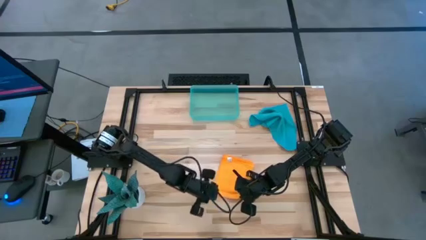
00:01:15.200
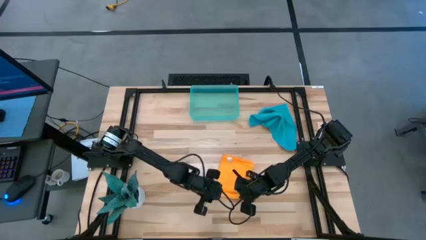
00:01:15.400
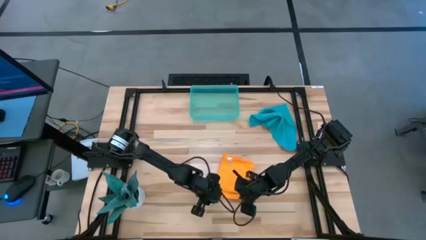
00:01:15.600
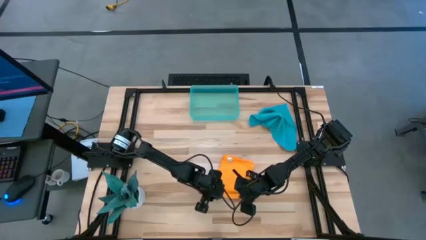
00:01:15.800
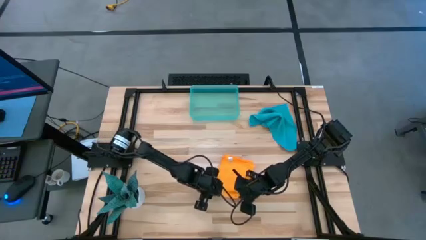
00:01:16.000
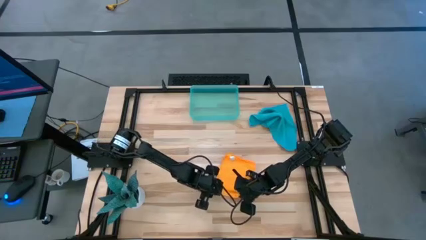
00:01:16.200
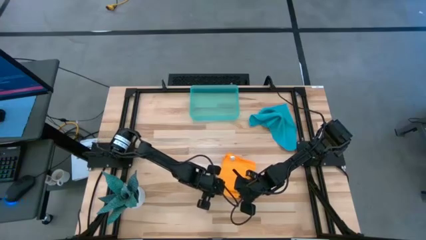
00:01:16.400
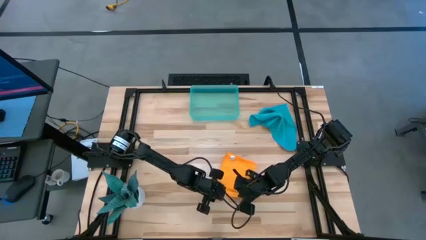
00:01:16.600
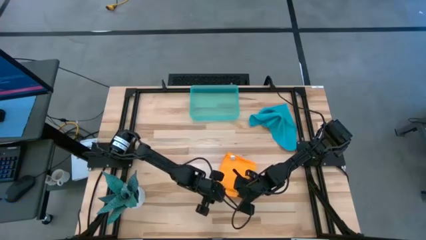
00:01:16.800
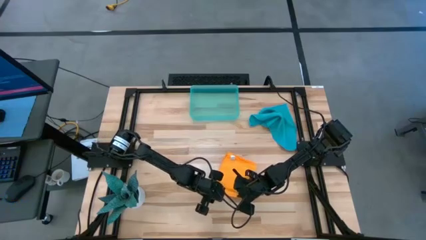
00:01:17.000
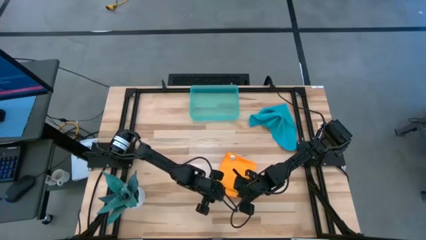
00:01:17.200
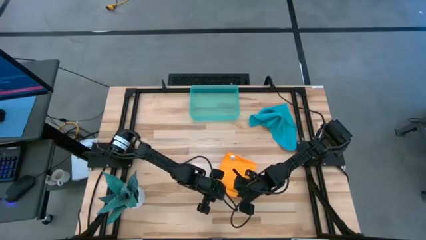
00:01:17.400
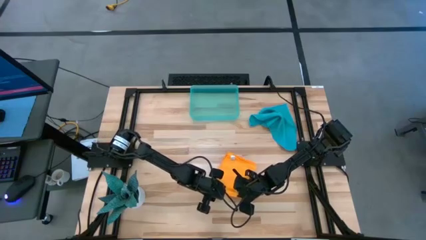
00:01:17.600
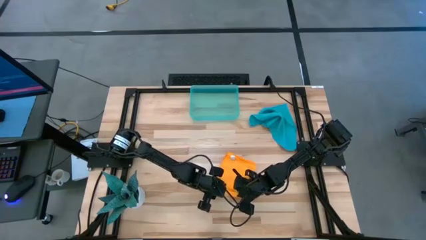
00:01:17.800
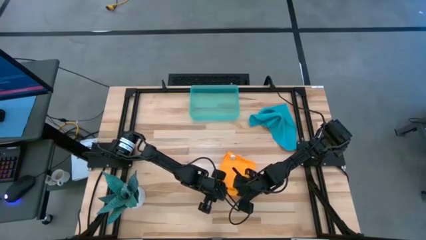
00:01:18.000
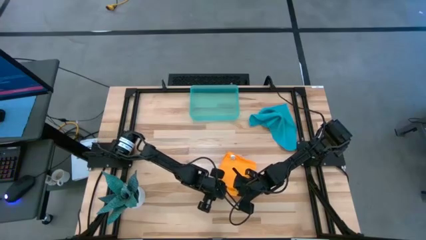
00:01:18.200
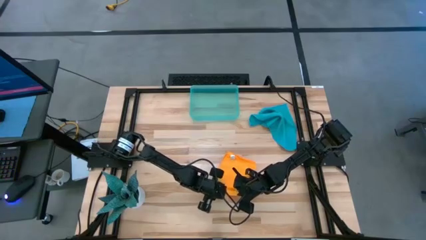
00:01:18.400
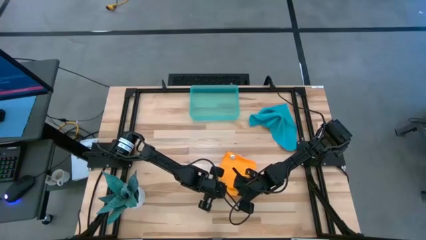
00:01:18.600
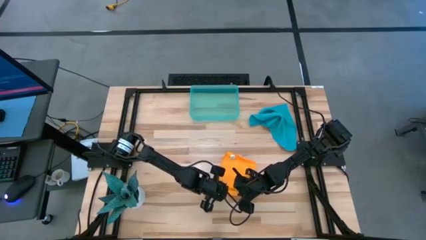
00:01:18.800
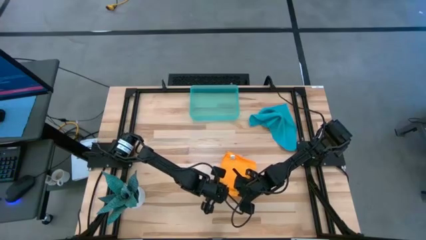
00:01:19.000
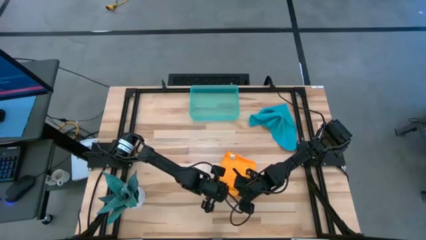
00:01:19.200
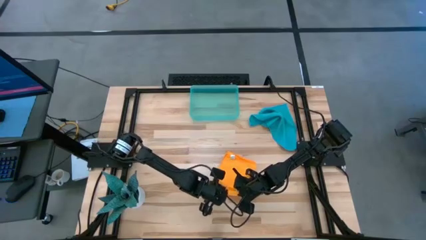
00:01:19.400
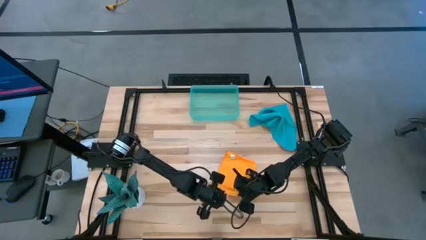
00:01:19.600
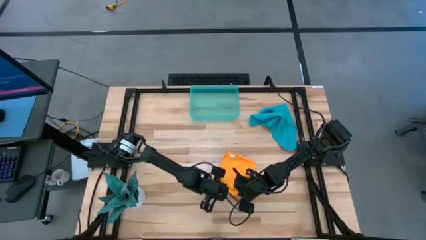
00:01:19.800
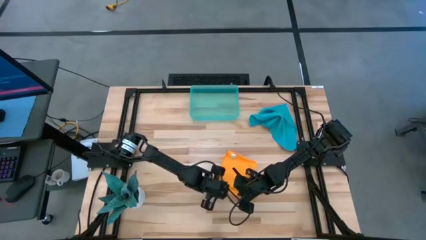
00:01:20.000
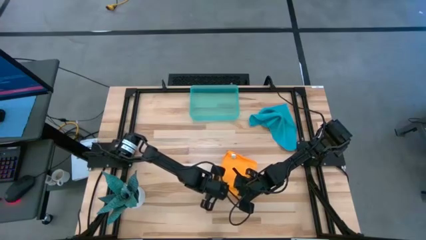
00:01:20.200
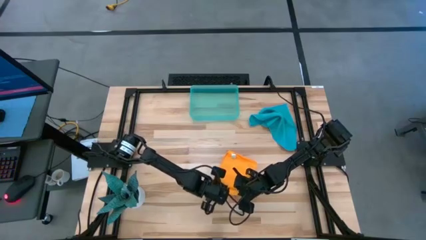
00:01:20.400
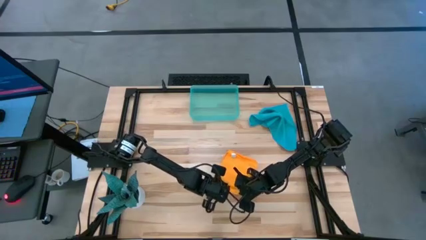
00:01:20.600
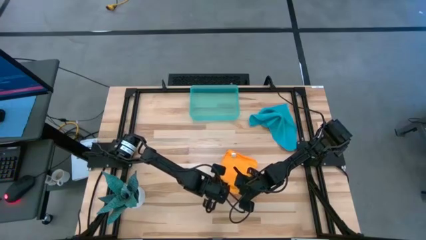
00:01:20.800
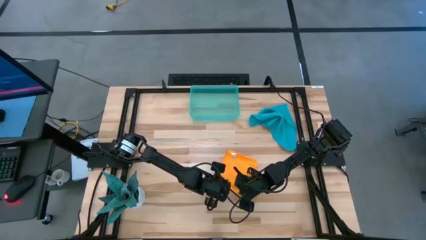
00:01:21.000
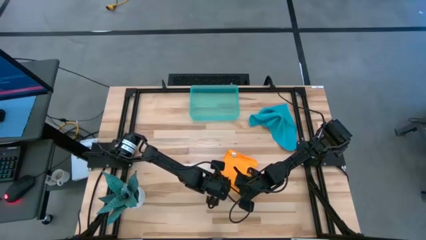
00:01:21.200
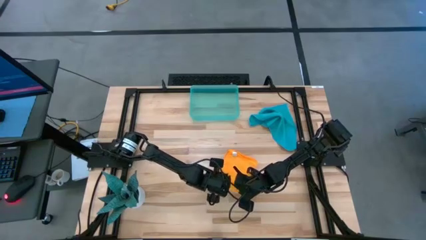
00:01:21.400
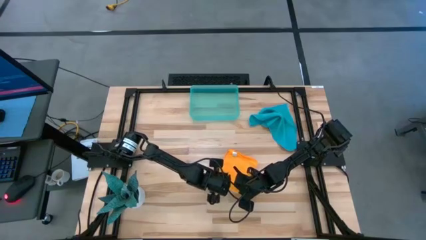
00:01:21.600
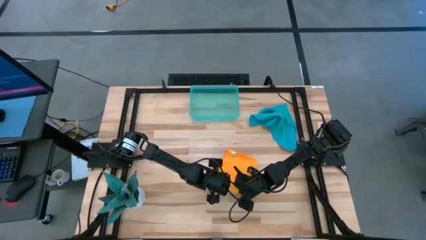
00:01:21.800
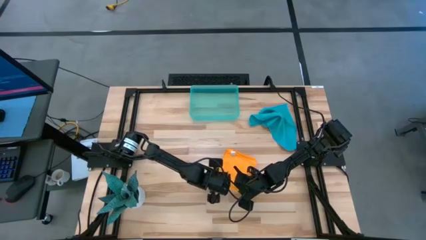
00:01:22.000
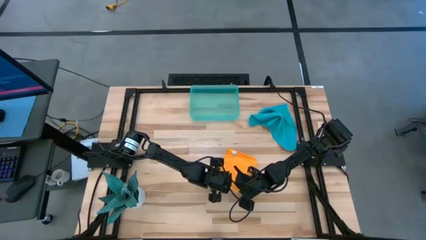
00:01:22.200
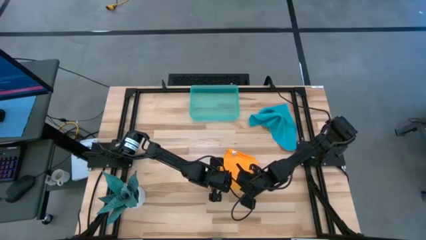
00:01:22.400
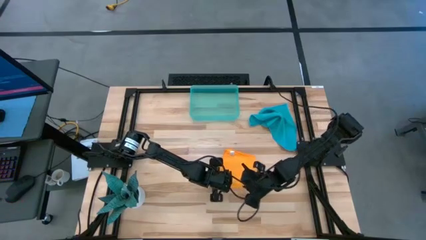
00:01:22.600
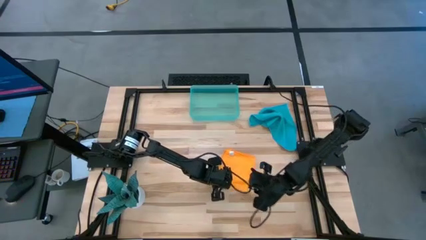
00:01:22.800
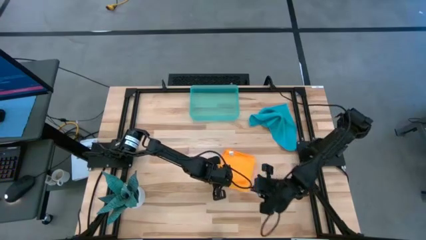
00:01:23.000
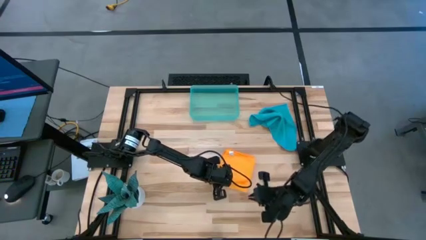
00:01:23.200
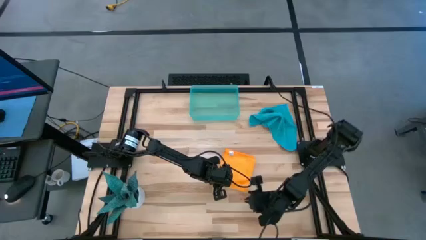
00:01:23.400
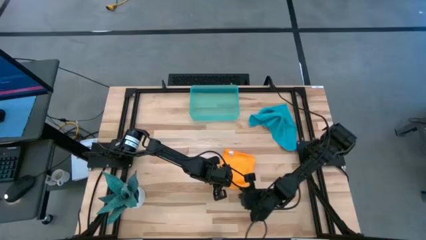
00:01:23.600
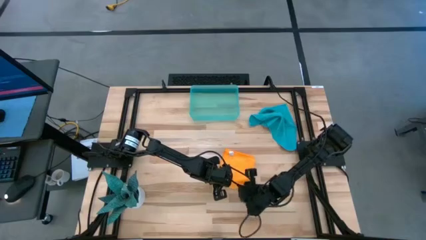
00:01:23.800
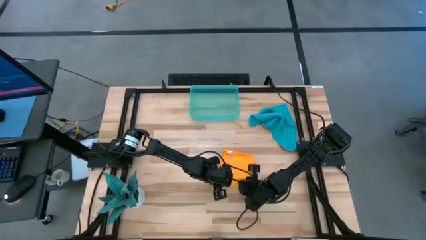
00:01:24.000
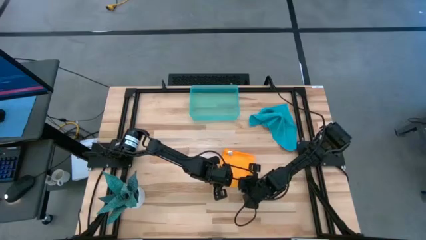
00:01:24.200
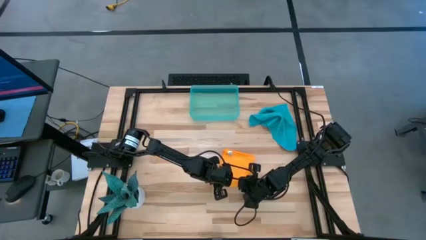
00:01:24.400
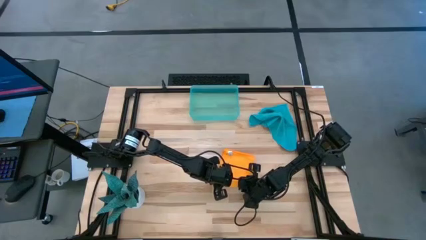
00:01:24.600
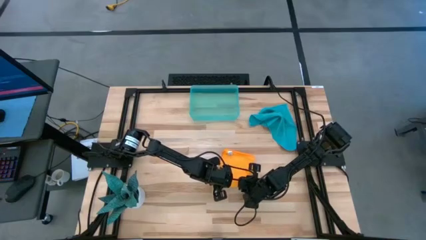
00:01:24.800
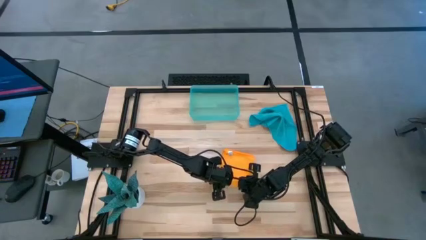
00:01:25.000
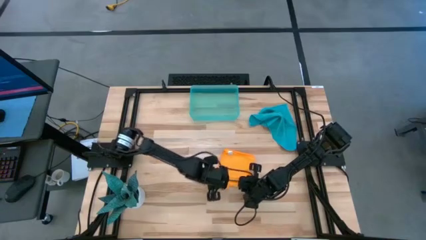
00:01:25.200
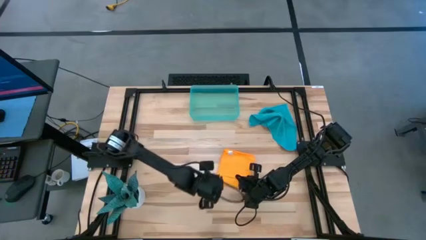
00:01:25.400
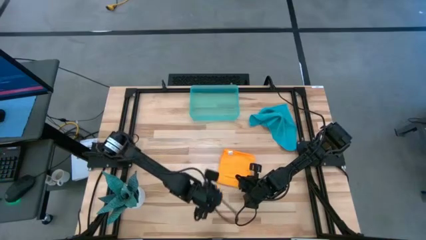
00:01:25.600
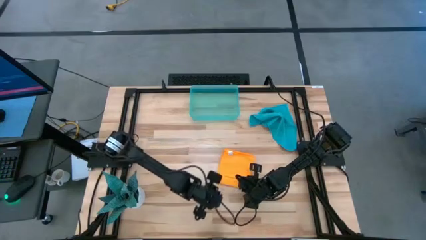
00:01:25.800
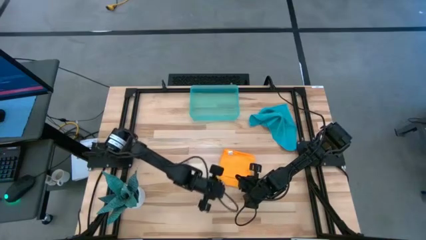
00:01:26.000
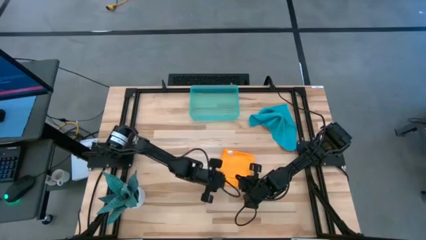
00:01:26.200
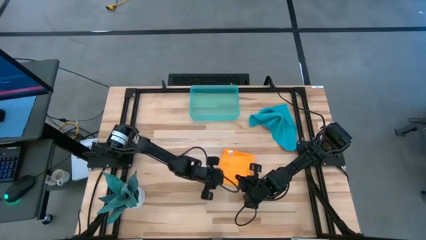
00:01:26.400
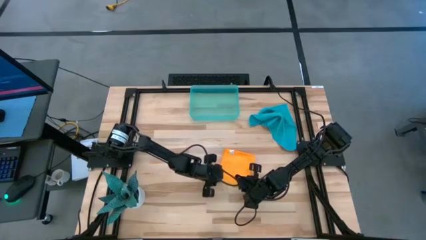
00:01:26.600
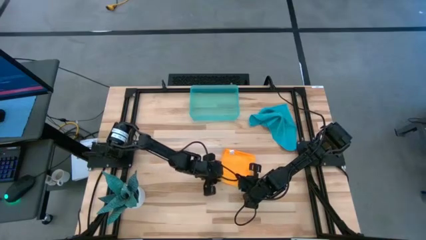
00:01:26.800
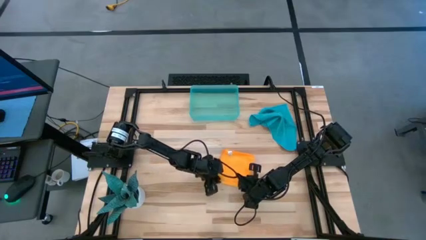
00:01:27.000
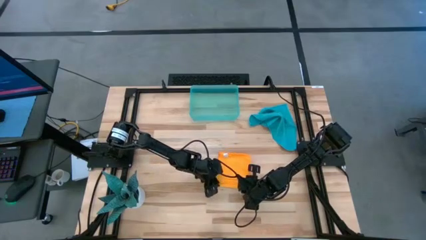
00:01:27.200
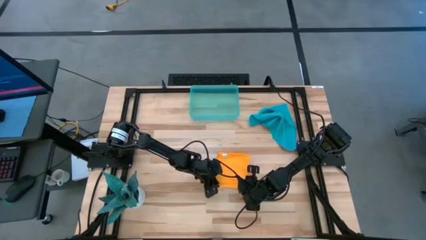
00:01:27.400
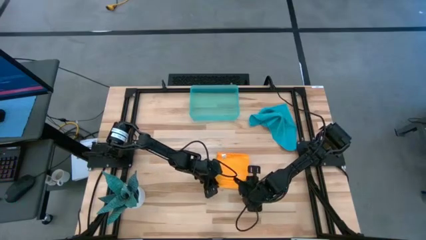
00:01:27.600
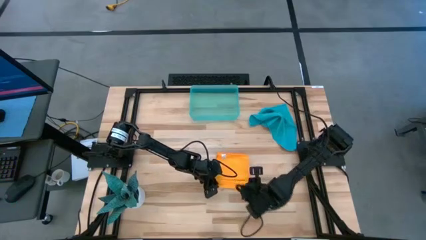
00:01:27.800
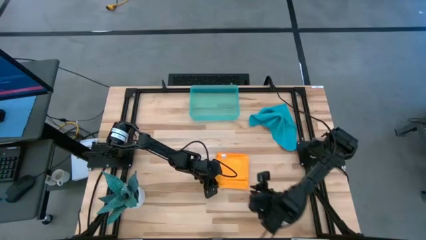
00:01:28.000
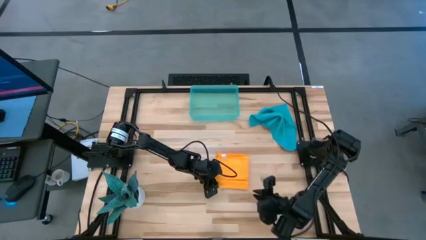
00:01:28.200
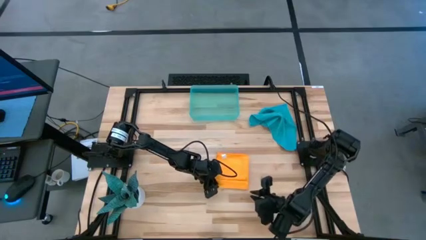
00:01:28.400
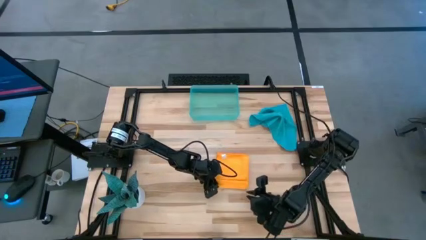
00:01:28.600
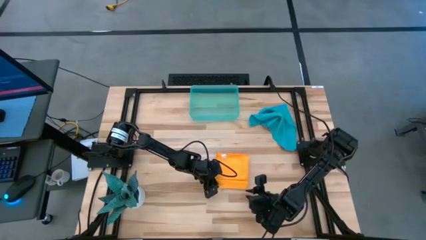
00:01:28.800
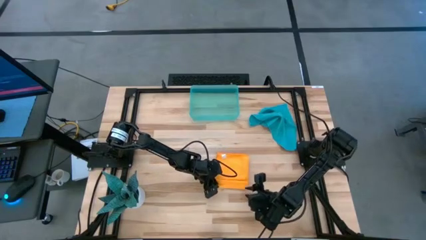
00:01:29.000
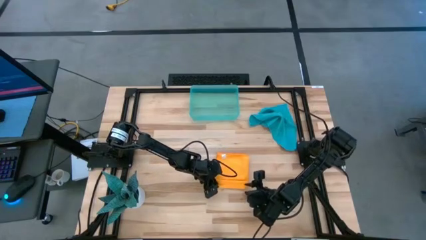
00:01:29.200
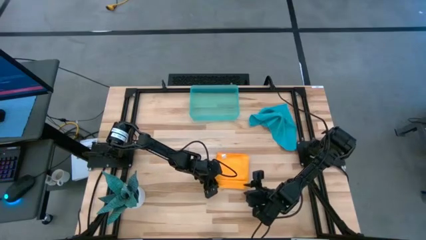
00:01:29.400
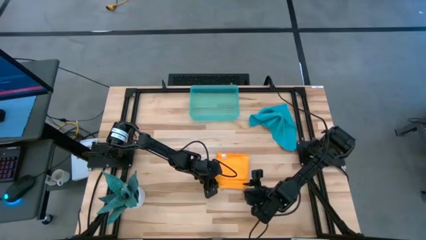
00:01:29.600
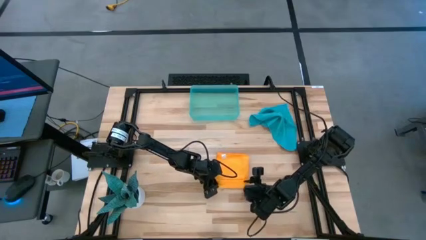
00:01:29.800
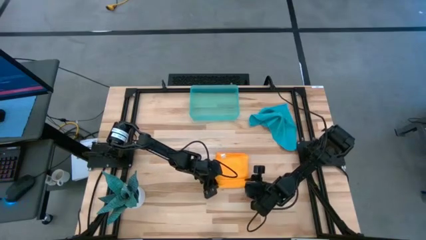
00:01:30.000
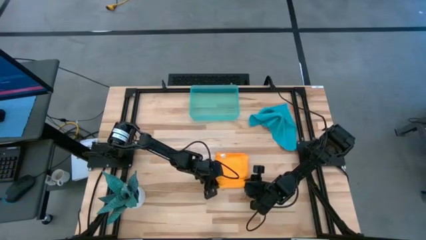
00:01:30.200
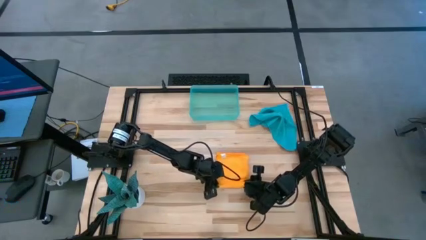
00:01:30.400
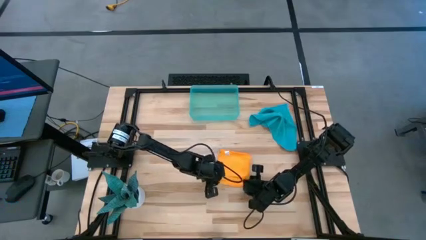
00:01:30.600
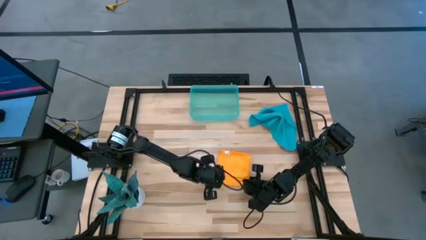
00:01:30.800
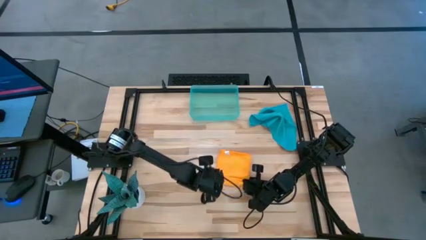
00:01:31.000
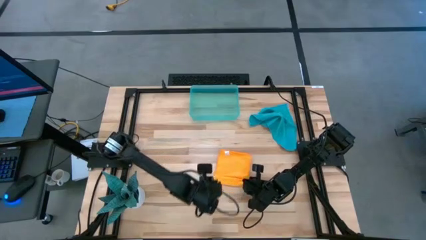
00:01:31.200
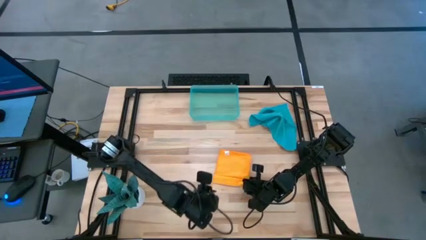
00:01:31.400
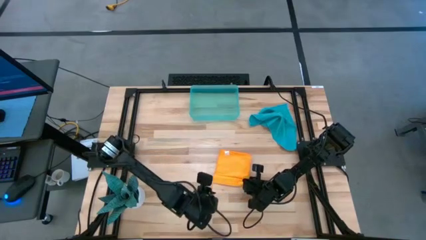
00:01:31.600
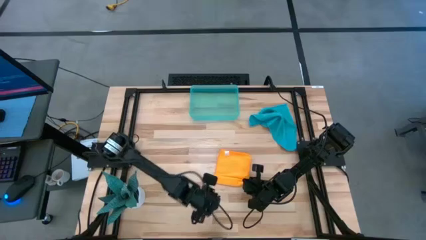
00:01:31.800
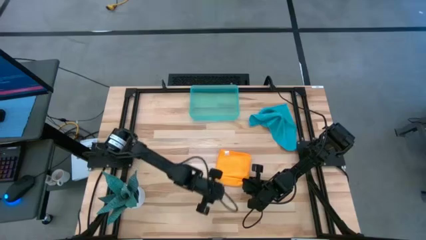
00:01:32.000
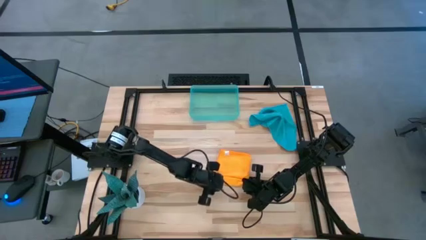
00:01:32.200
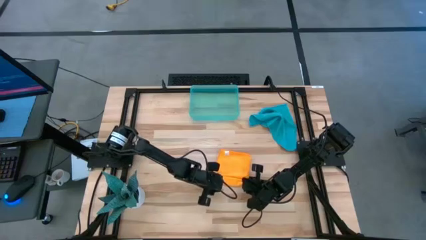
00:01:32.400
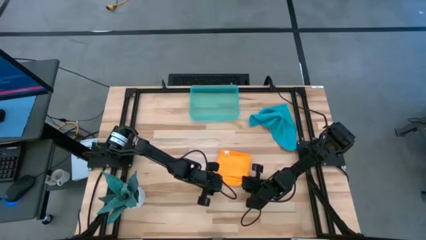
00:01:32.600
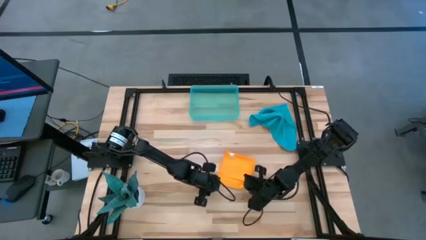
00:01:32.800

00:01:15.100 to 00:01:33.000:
Task: Roll microfiber towels into tight, uniform cylinder then place into a basket
Roll the yellow microfiber cloth on the table
